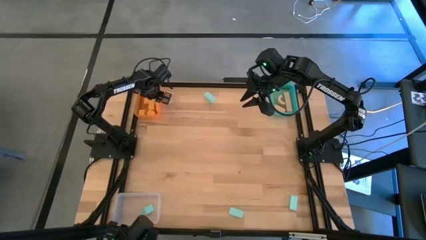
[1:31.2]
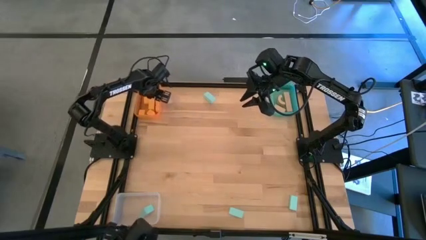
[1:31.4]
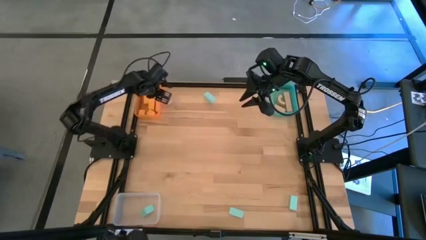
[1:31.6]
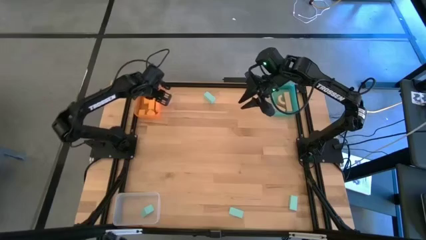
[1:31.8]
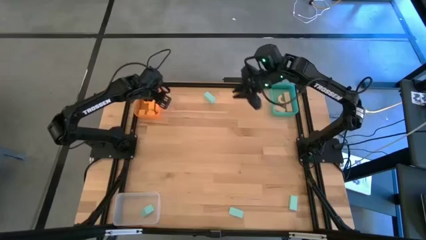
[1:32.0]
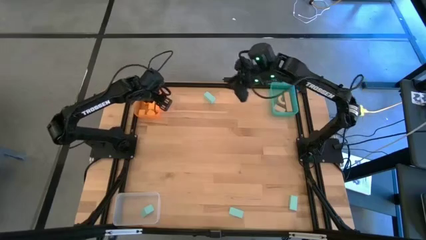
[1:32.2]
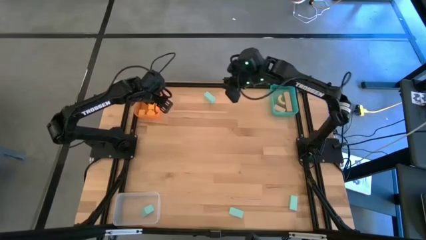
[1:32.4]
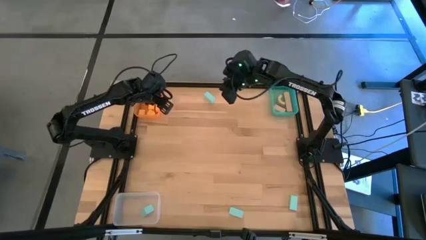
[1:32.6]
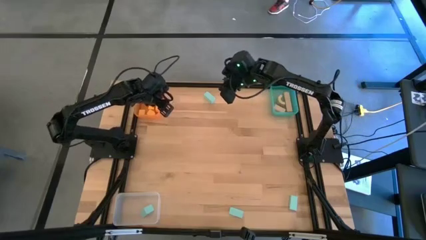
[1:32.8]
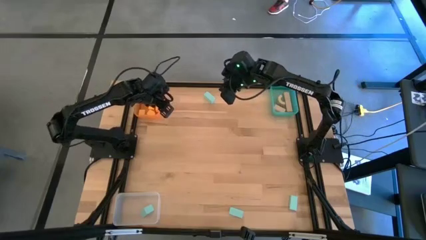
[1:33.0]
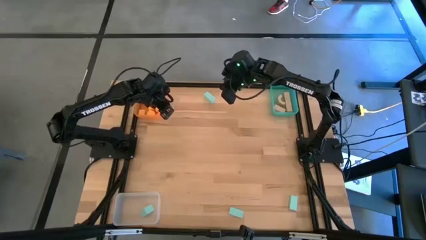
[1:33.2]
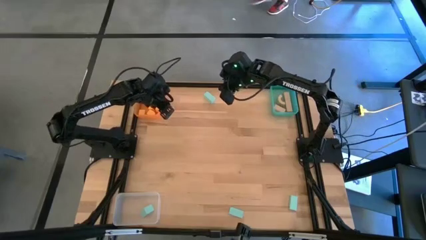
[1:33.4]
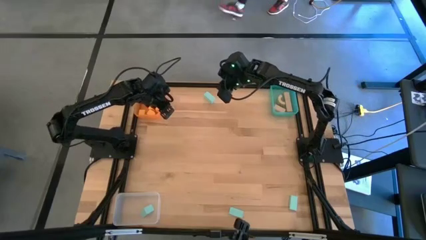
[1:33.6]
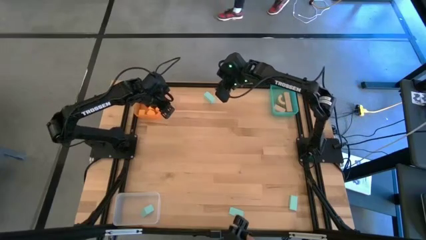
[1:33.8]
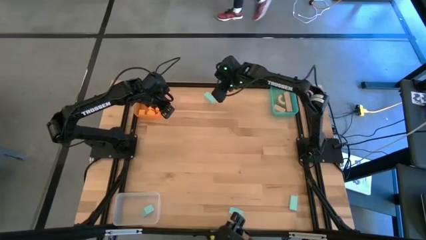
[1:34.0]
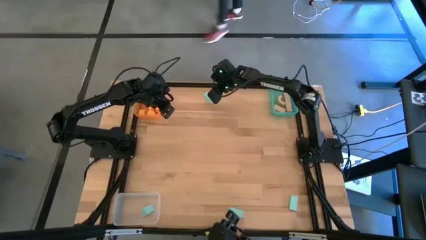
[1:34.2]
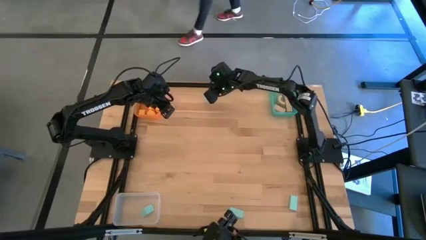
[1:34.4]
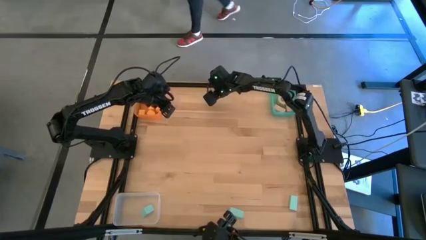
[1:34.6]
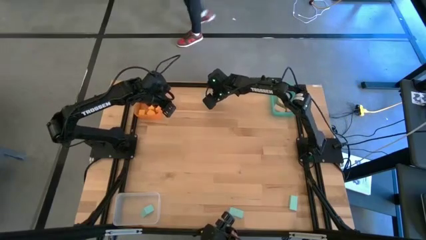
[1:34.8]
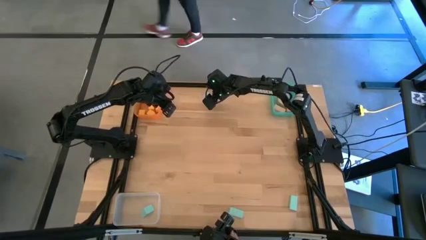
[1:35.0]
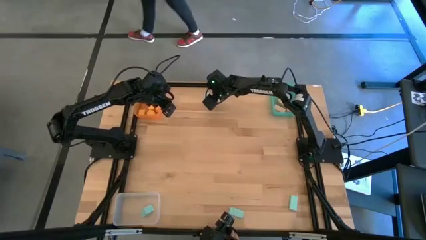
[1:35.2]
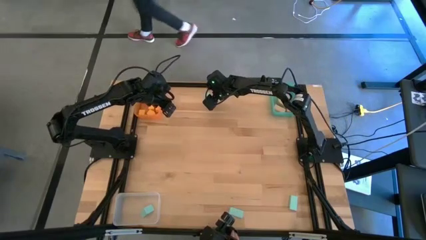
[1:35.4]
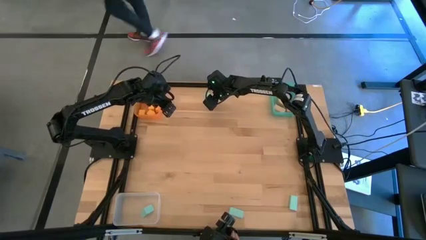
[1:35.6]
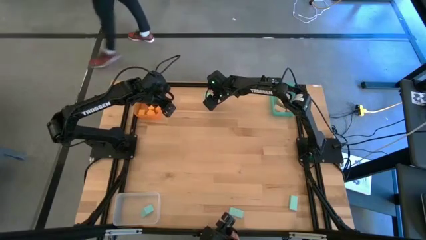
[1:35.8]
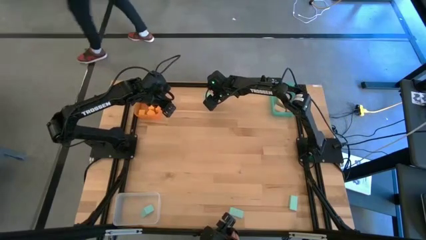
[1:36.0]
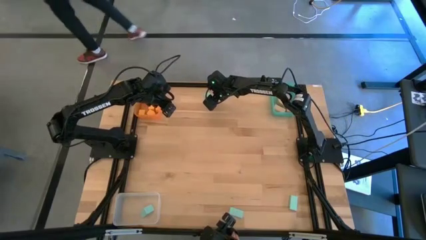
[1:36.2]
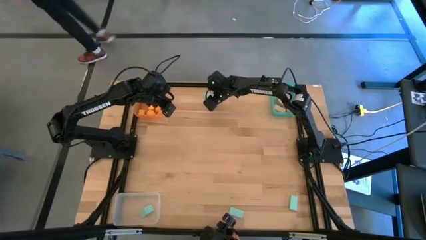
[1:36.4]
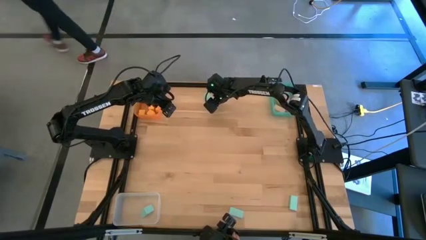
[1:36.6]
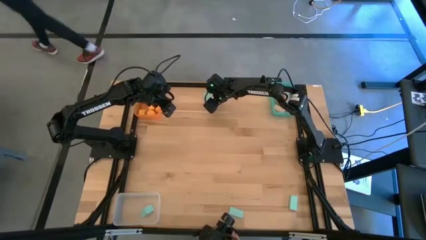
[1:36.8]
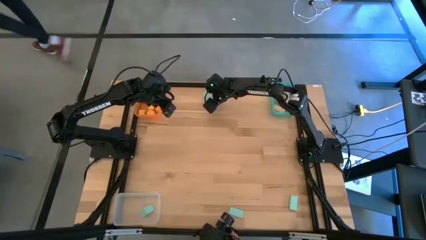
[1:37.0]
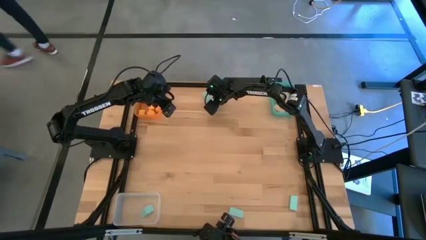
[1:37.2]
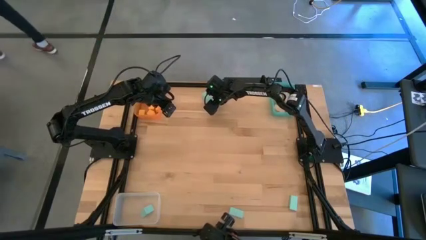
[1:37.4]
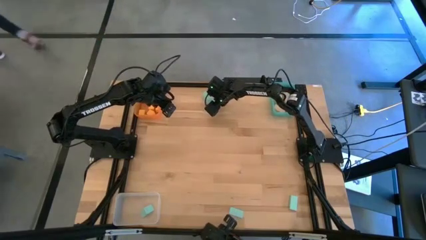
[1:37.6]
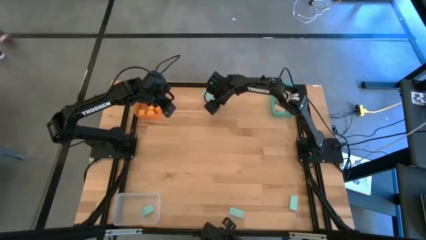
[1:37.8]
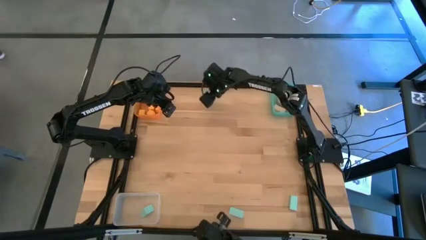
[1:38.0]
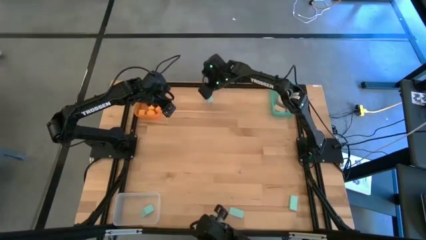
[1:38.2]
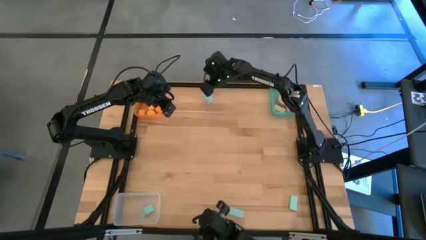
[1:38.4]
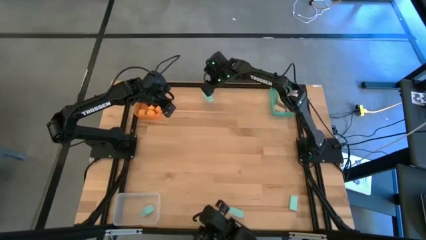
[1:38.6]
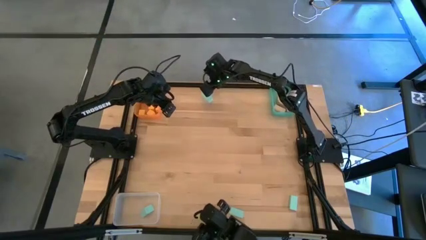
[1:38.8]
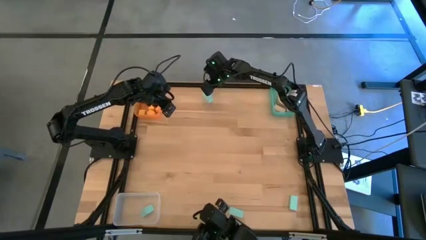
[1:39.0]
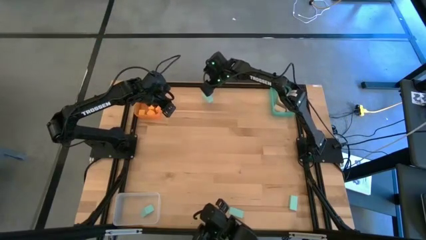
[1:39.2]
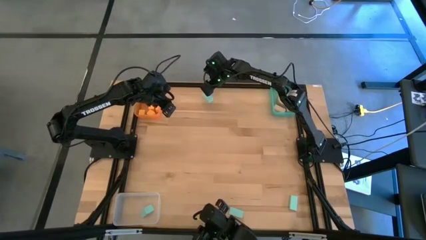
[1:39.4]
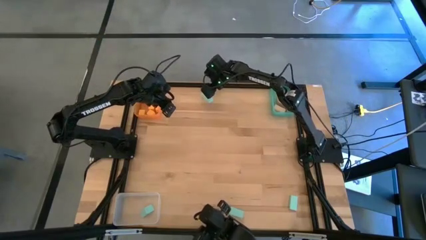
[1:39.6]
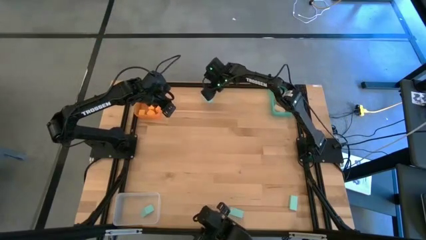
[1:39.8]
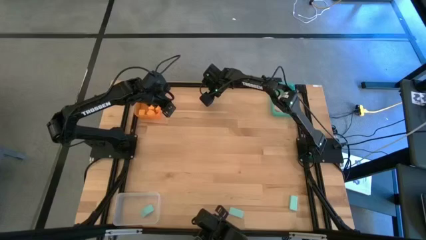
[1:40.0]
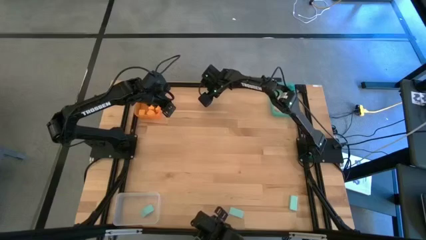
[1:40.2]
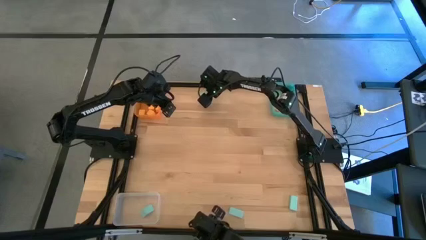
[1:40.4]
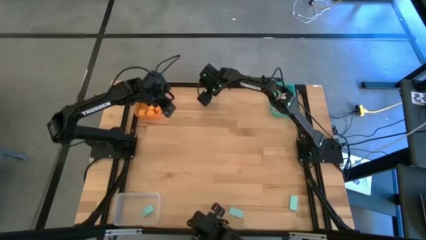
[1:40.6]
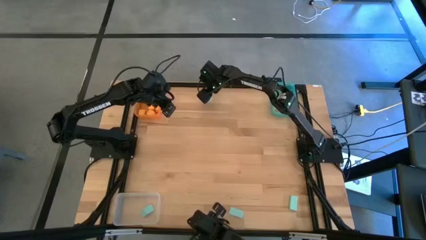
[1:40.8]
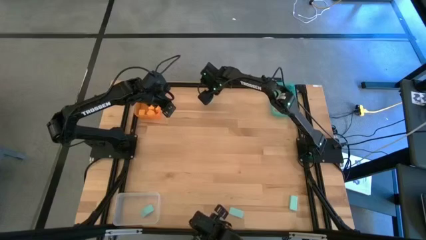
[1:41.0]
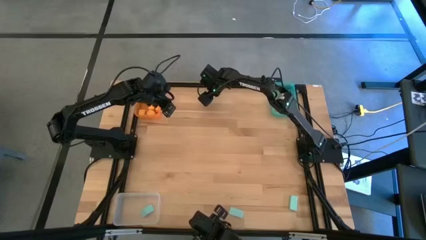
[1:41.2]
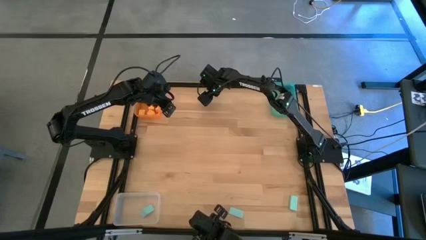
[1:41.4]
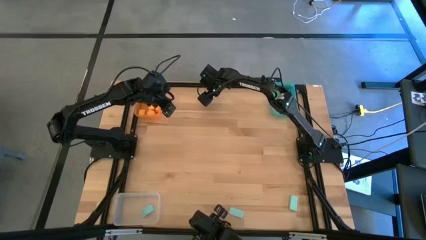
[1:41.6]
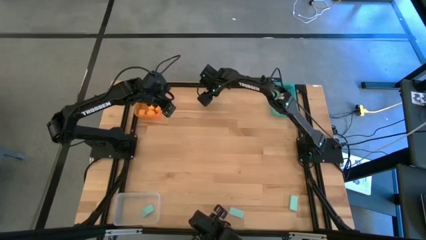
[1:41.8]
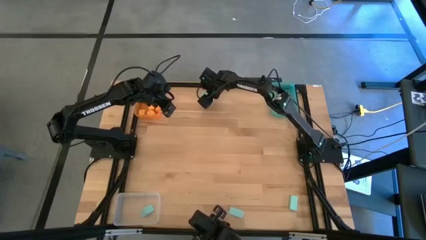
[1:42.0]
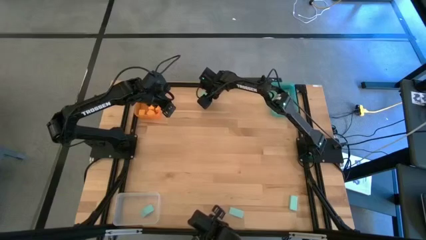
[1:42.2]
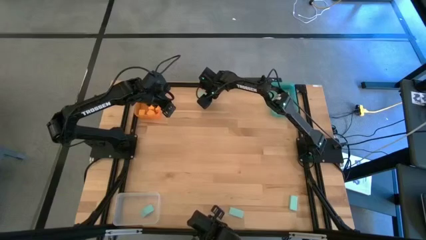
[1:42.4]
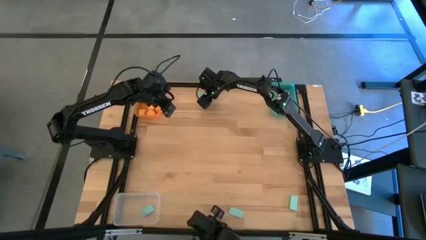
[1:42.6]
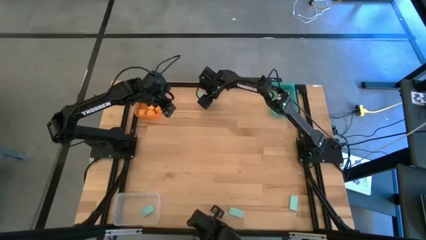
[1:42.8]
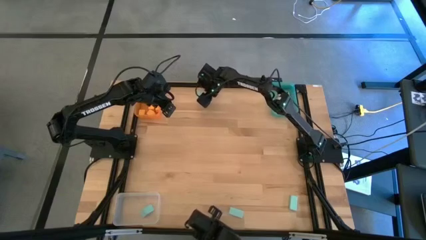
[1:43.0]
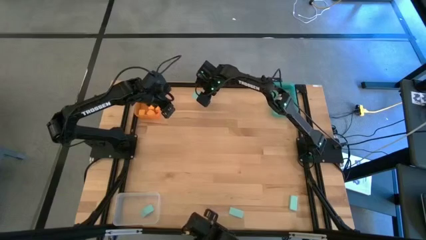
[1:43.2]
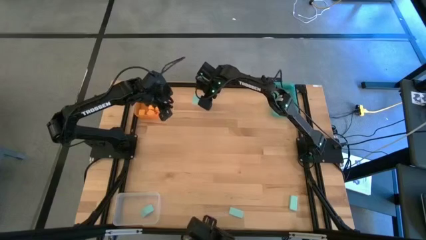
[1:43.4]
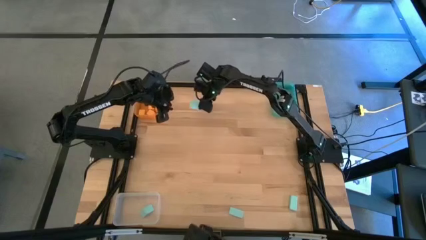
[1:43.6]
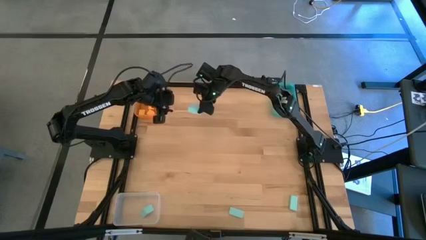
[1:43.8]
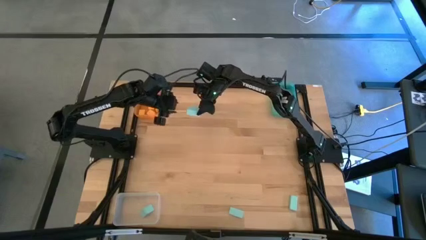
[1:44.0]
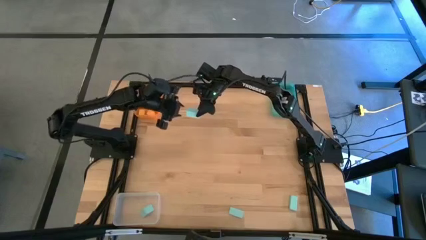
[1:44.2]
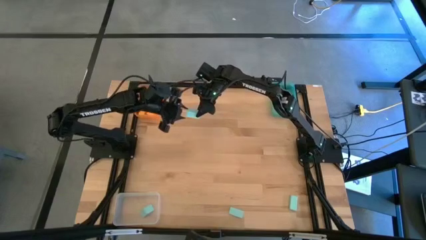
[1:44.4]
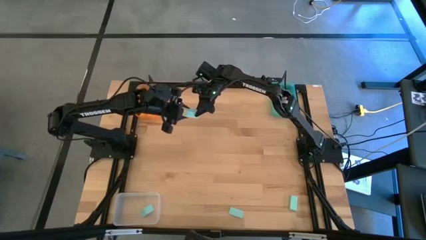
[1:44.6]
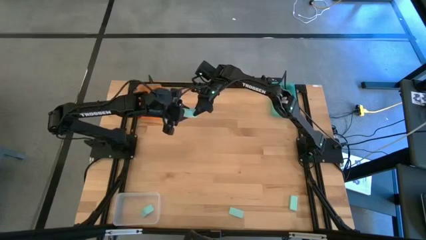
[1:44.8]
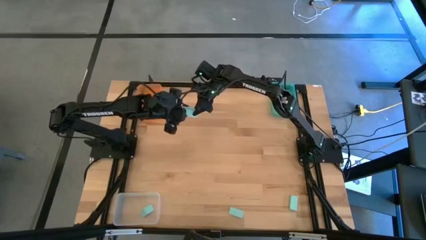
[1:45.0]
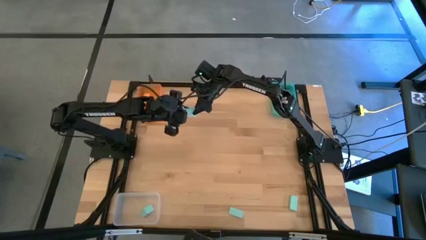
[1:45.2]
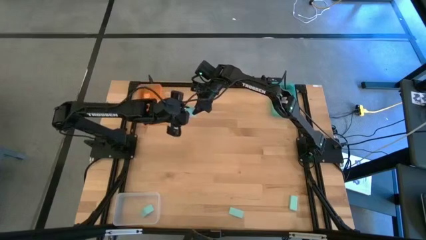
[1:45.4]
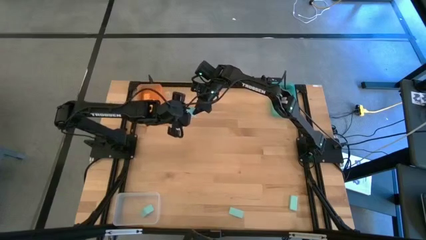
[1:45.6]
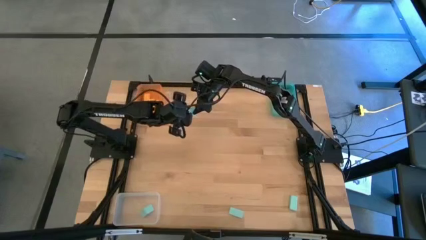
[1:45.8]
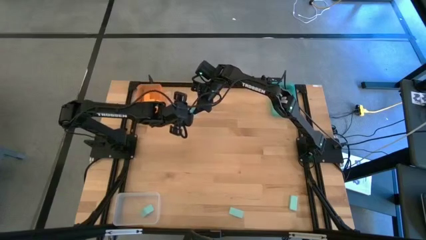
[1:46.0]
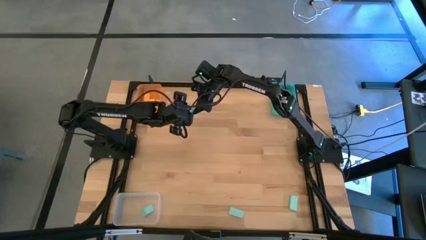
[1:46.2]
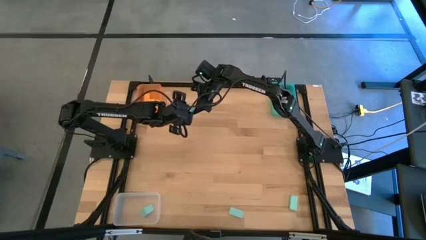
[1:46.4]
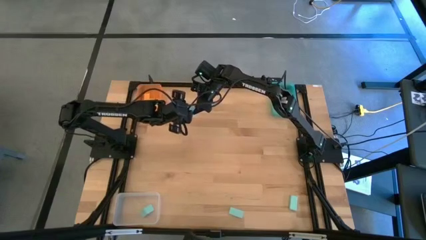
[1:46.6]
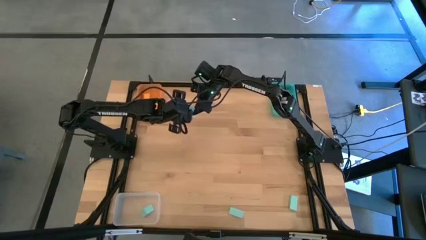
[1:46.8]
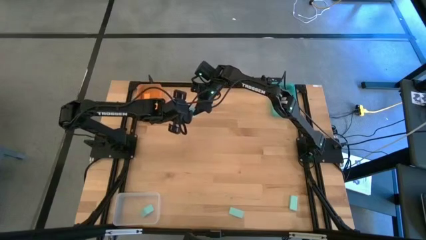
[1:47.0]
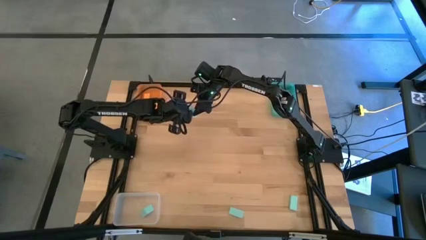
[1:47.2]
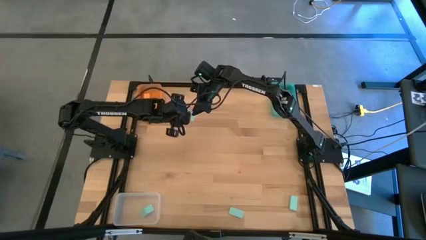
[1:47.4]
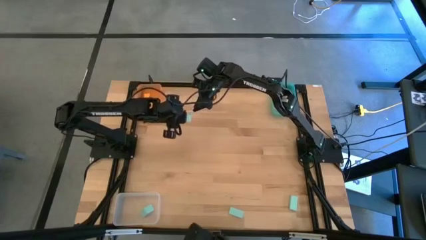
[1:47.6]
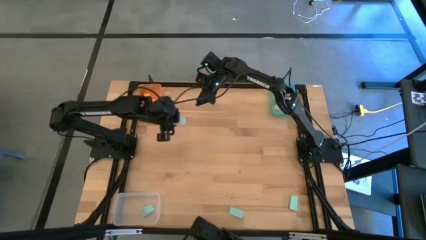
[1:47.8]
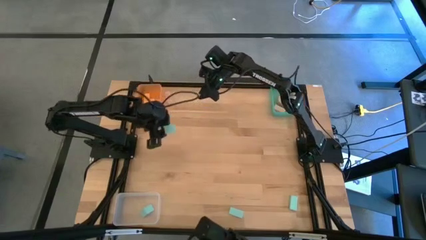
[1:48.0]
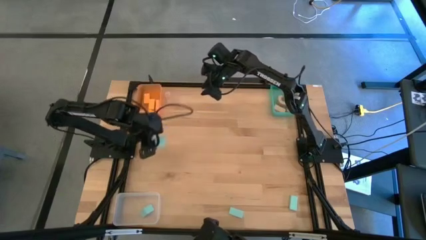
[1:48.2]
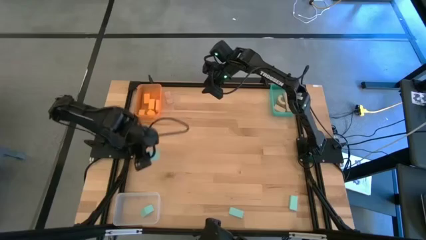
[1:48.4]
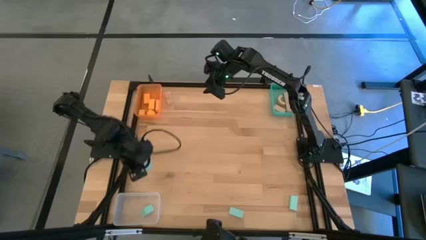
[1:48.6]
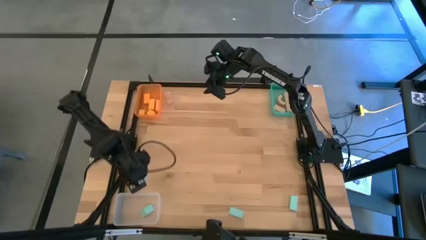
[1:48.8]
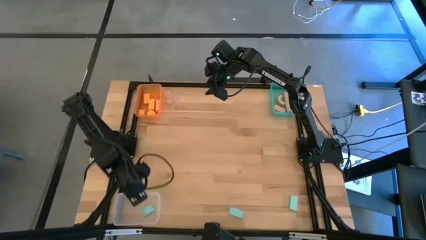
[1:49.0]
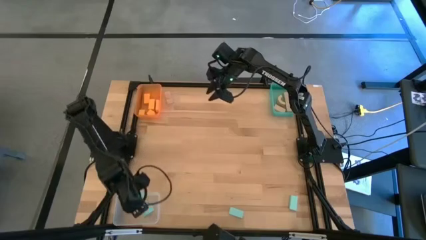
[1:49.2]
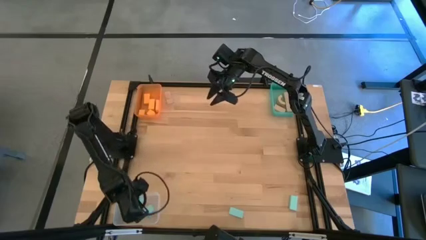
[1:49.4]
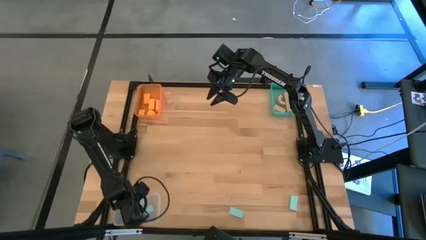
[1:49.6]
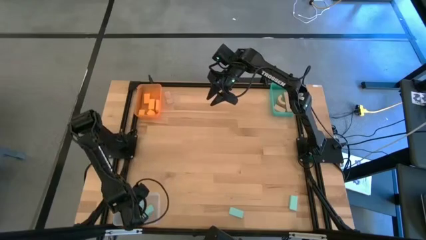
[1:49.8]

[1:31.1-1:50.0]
Task: Sort & place blocks by color
Put the blue block into the transparent bin
